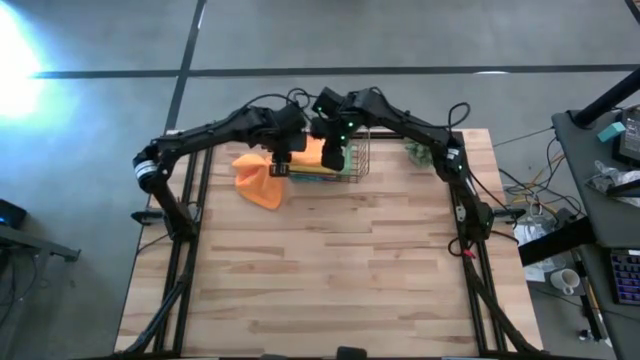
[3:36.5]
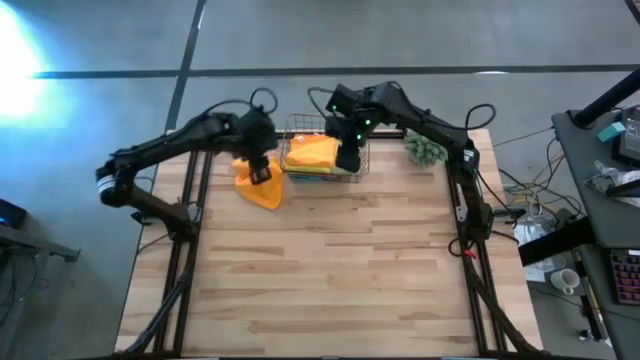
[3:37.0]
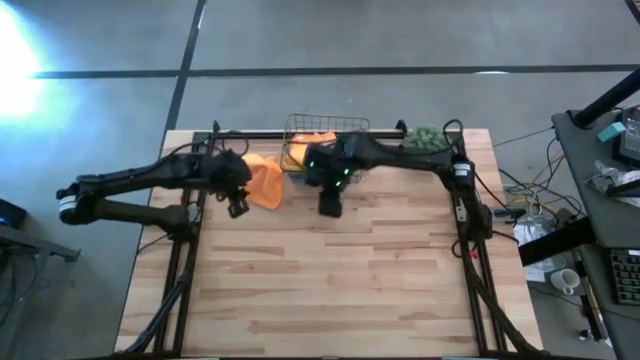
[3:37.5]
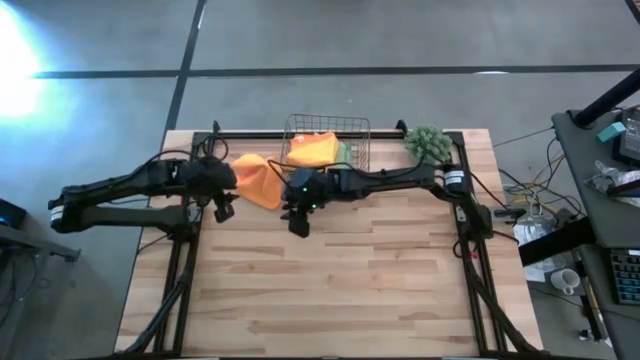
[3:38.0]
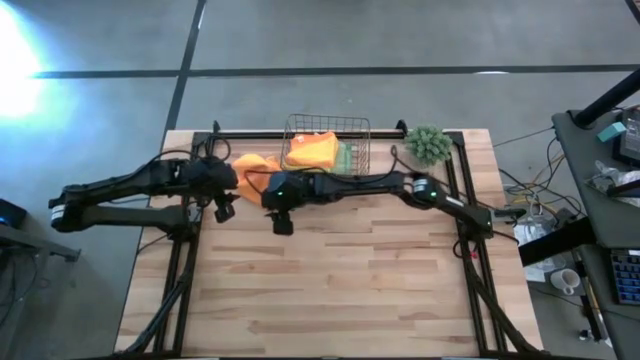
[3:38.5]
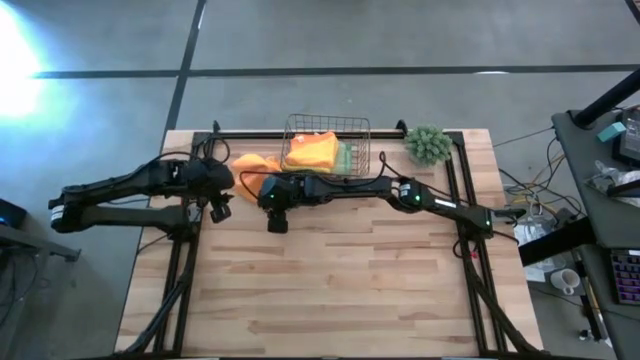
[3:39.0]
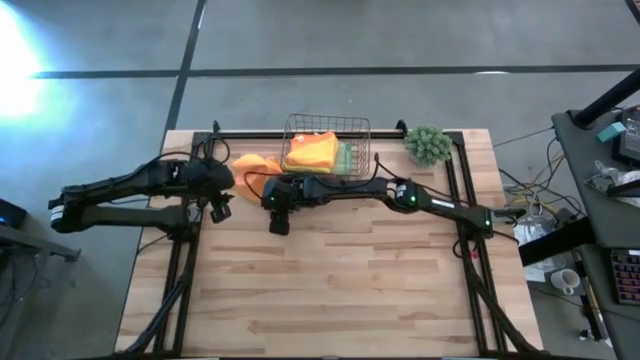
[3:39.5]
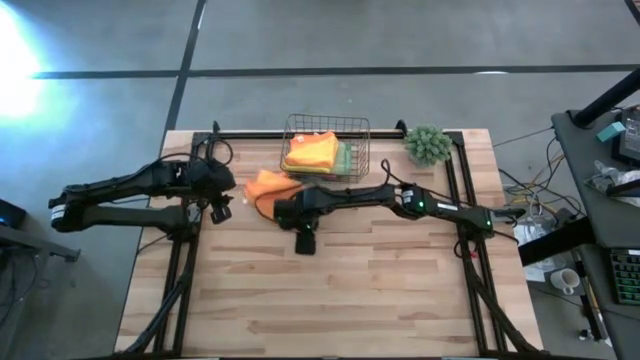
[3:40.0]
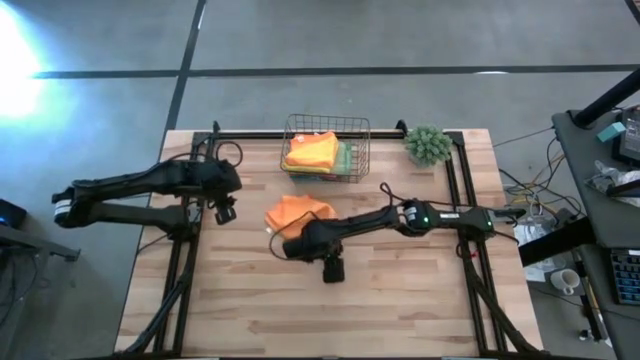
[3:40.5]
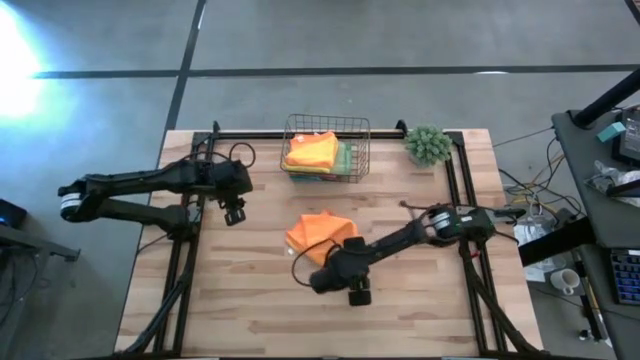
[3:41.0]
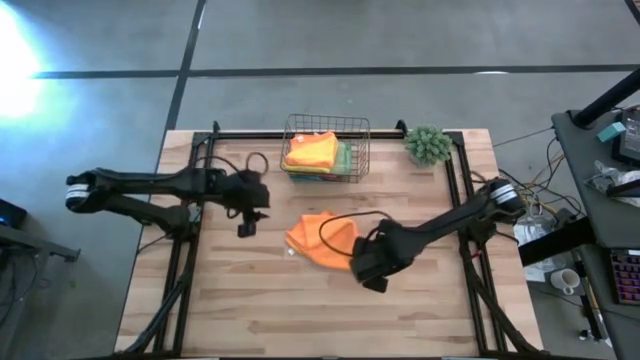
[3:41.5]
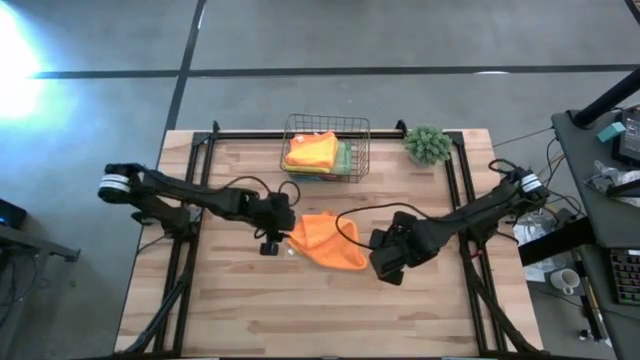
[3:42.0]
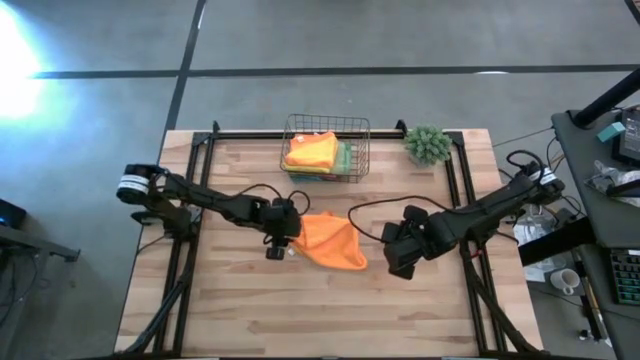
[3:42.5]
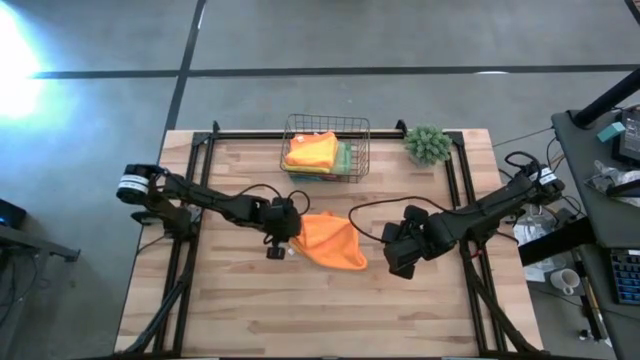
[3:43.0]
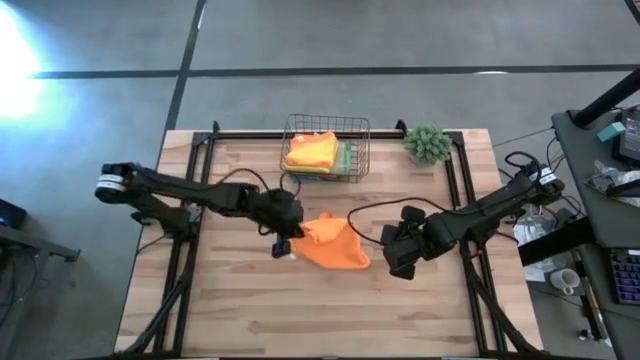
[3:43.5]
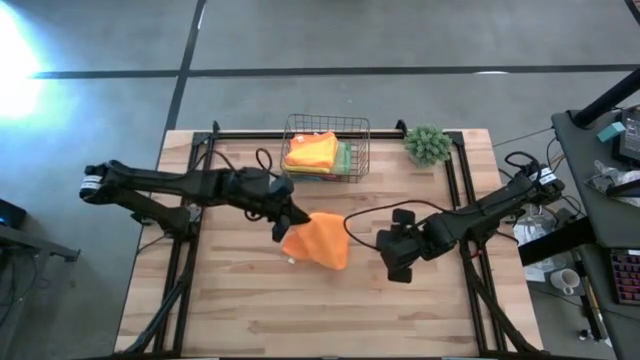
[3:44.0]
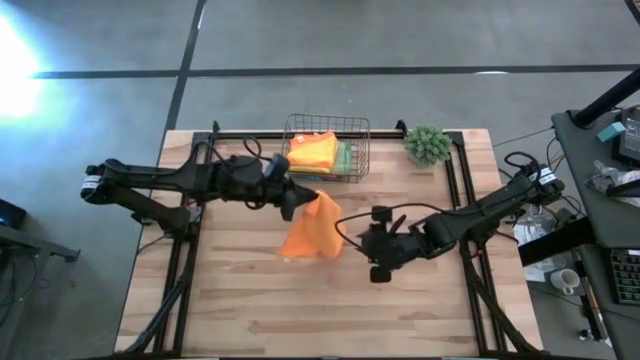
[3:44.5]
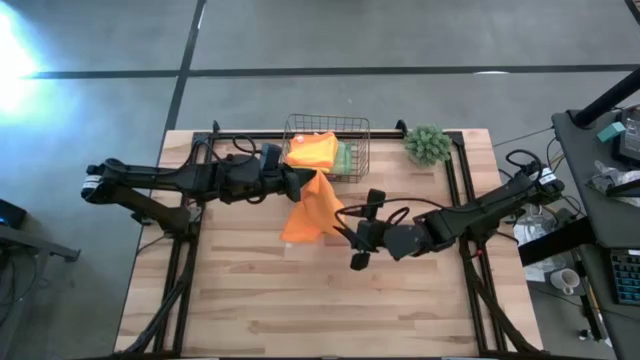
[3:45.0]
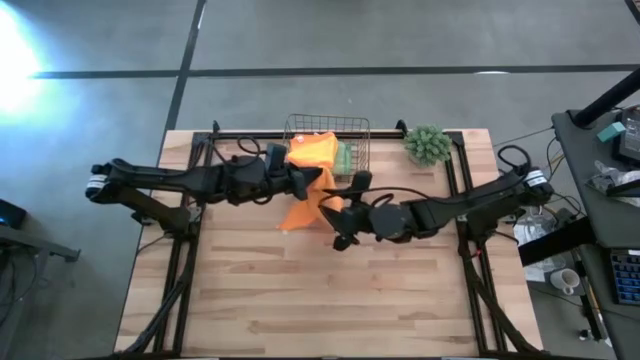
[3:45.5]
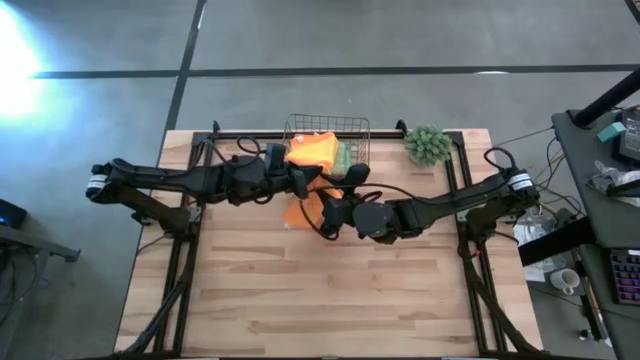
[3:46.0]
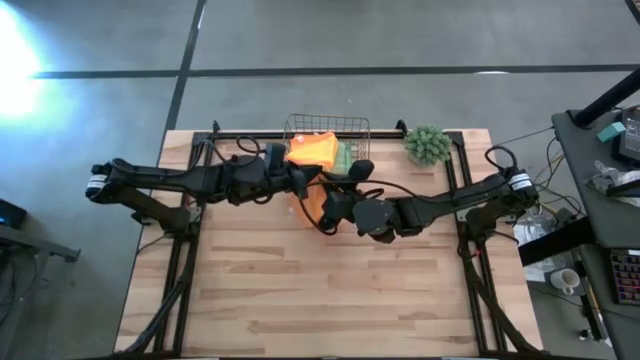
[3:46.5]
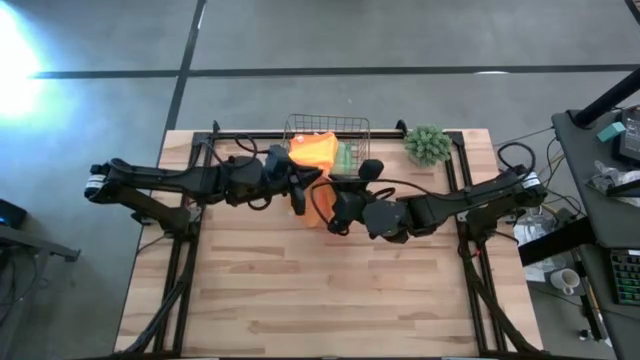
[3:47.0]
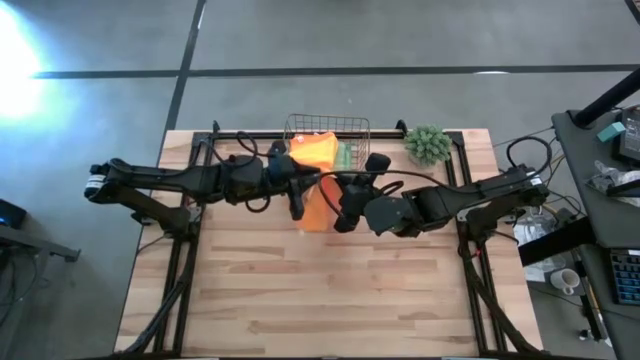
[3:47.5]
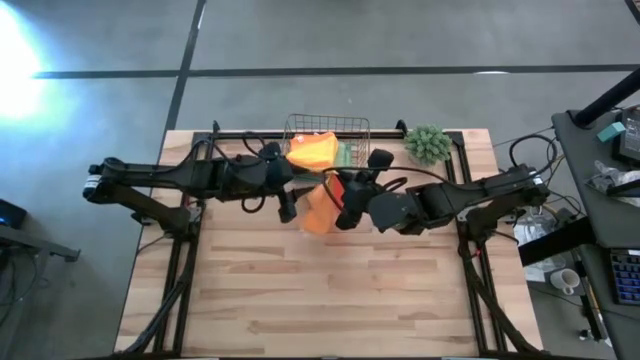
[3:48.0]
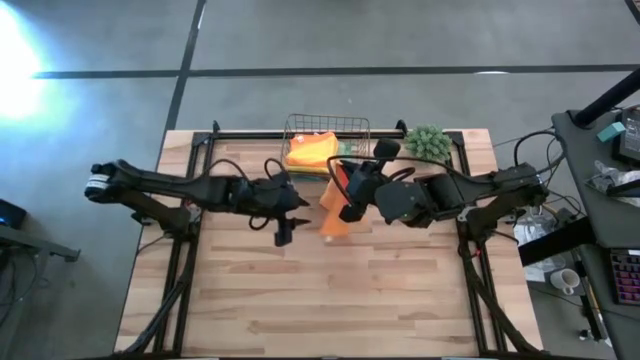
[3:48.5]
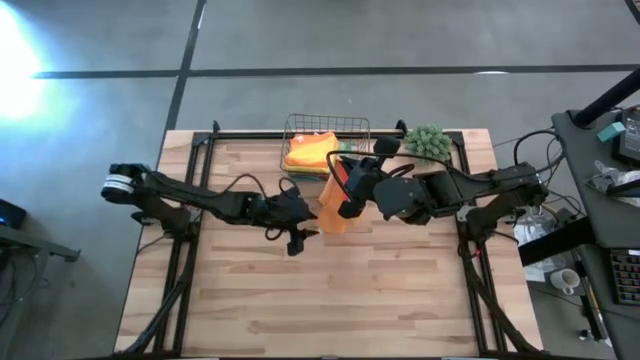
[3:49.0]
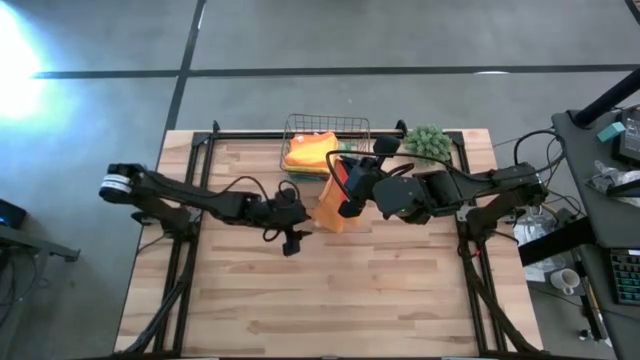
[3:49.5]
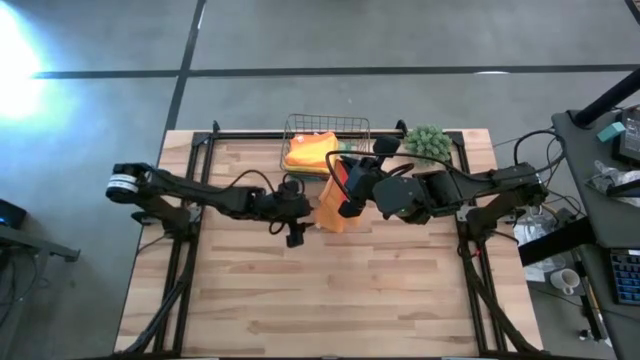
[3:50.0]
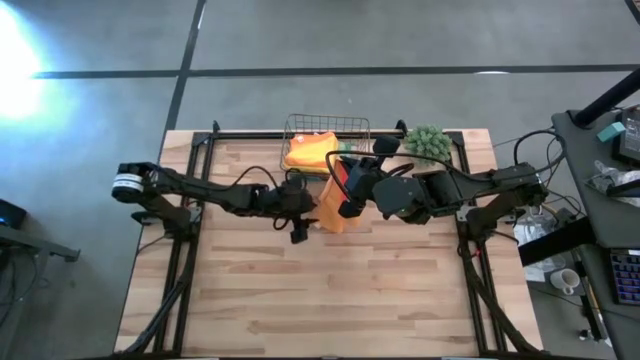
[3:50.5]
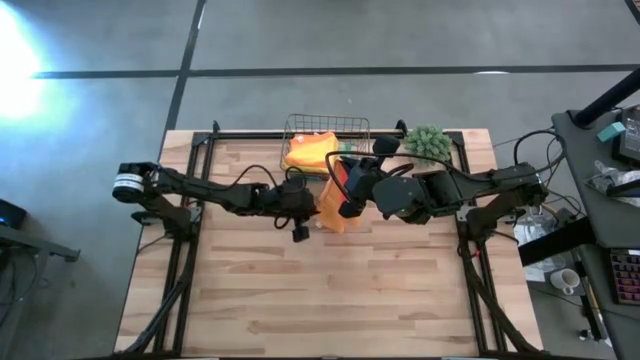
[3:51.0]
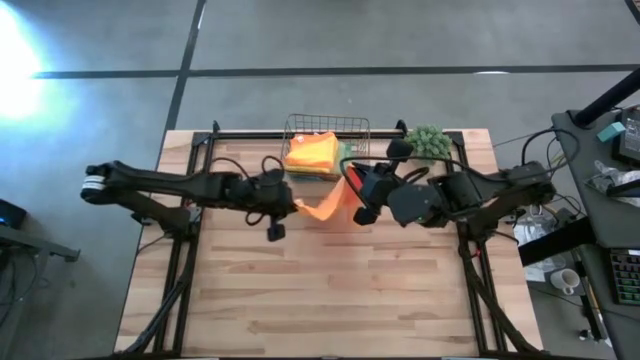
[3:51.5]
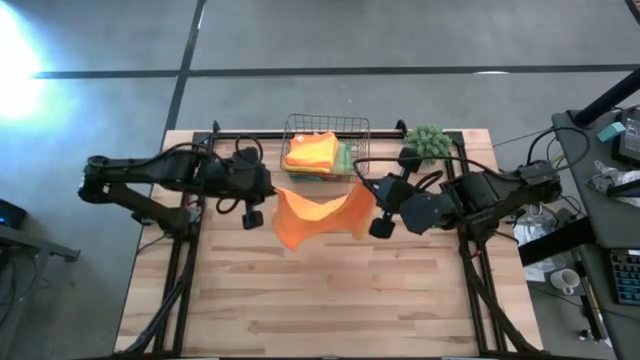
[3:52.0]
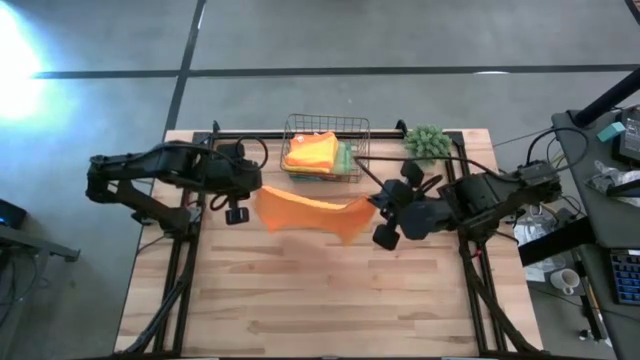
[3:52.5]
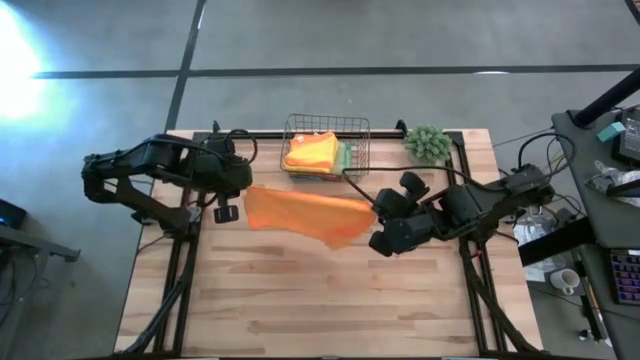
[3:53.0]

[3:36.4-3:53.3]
Task: Fold microfiber towels
Fold the orange microfiber cloth

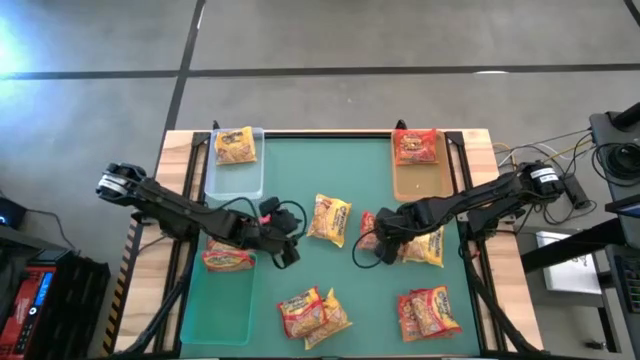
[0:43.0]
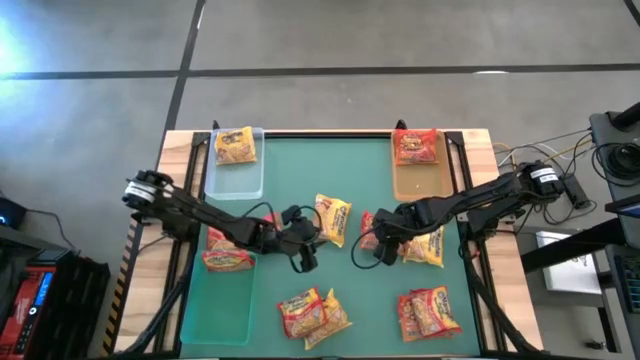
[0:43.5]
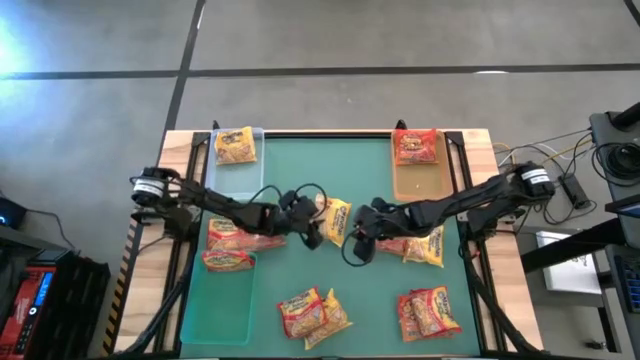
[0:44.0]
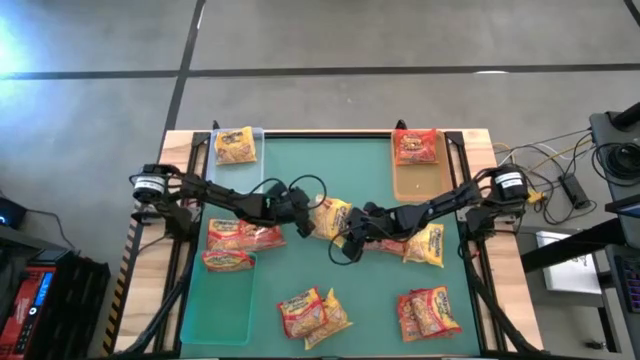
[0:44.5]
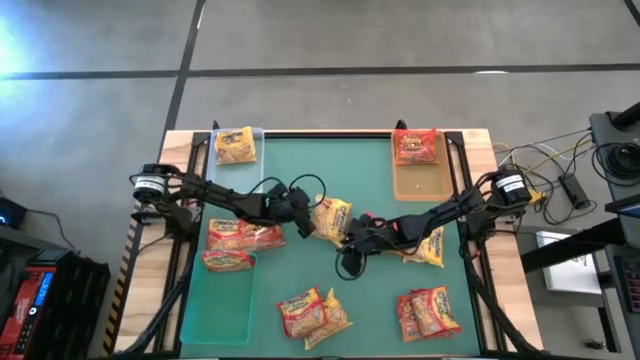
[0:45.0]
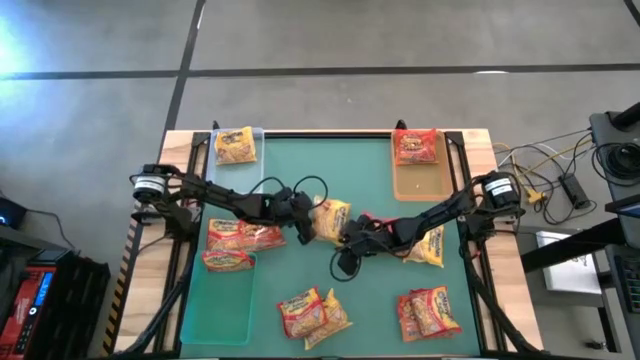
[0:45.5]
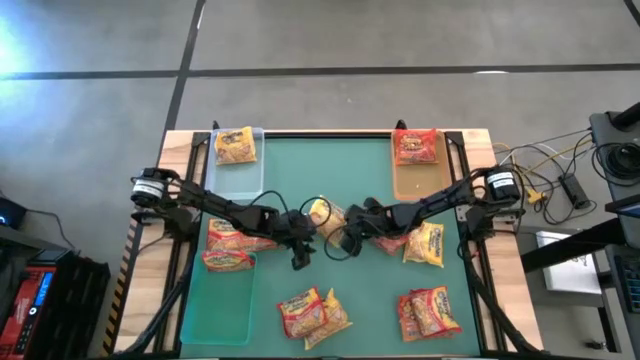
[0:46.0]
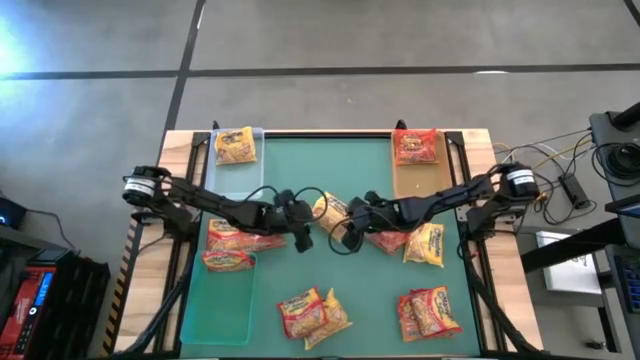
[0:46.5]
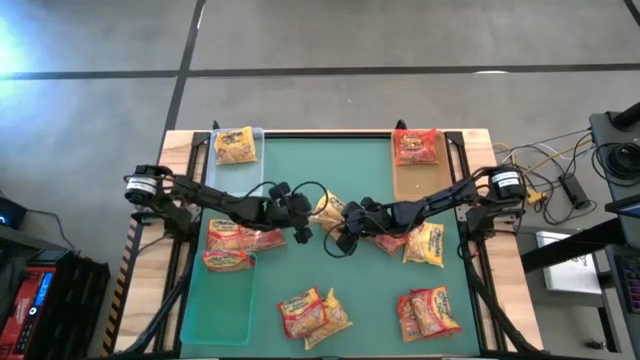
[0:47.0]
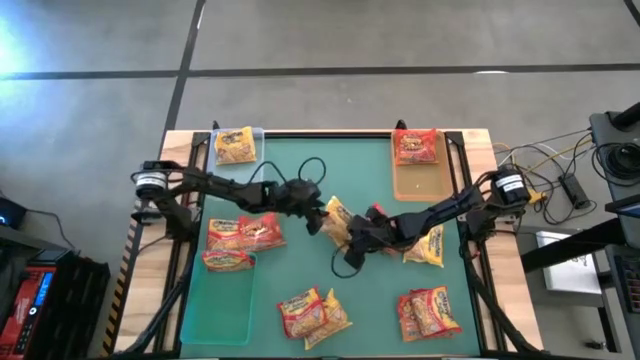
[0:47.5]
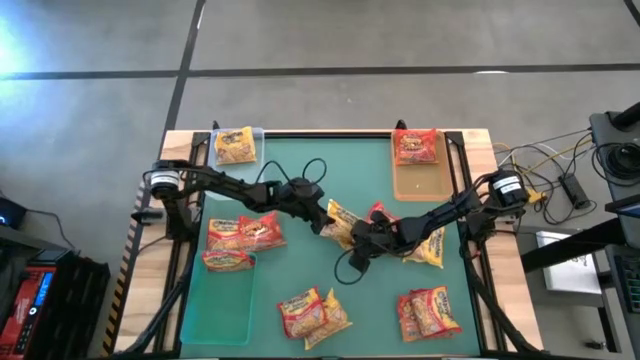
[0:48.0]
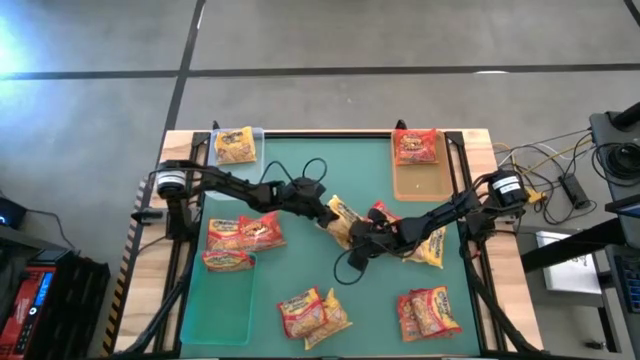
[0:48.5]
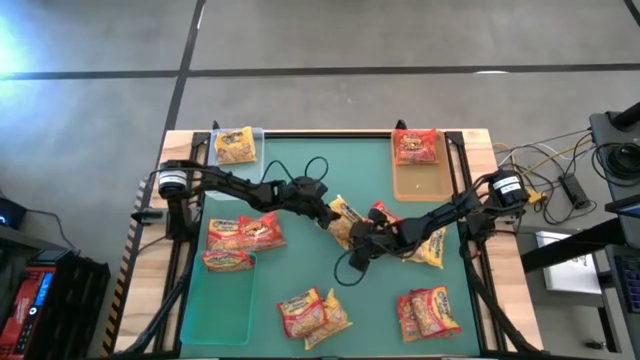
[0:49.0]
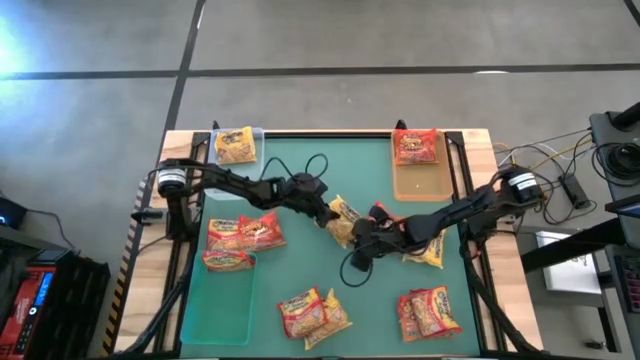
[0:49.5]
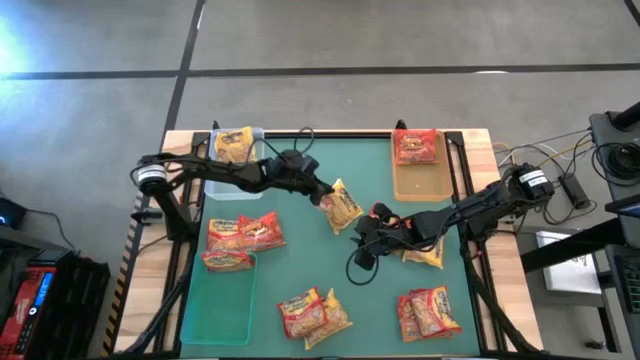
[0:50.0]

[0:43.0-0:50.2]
Task: Sort Maruchan noodles
Put the yellow noddle pack into the transparent bin
